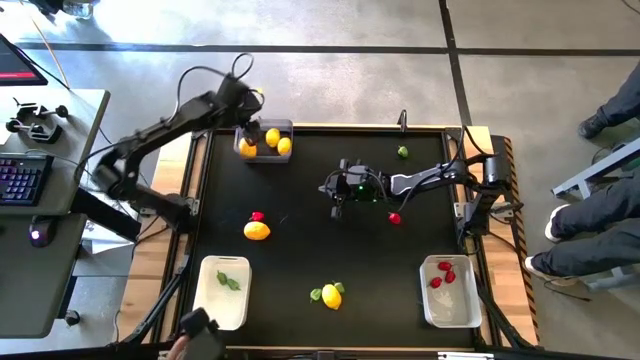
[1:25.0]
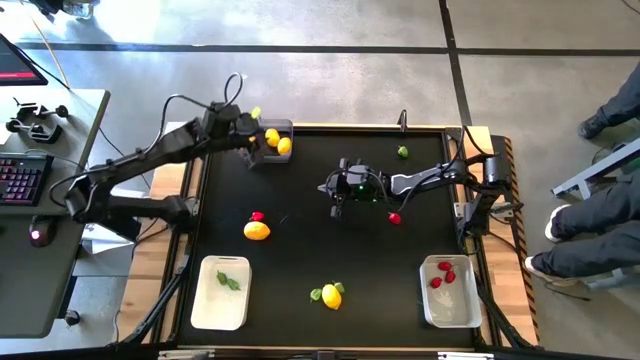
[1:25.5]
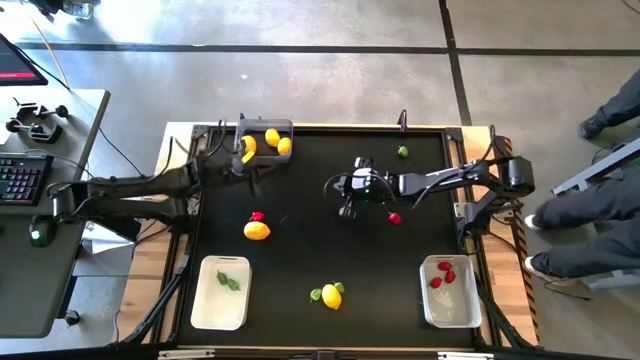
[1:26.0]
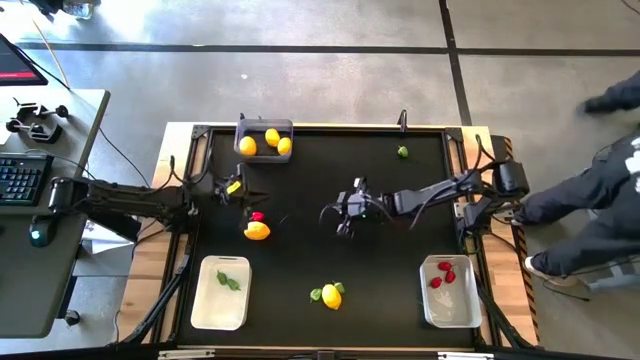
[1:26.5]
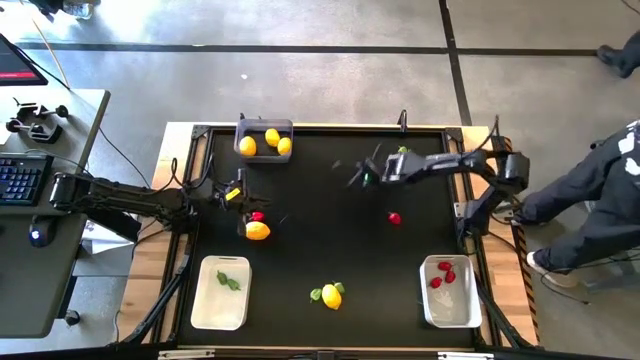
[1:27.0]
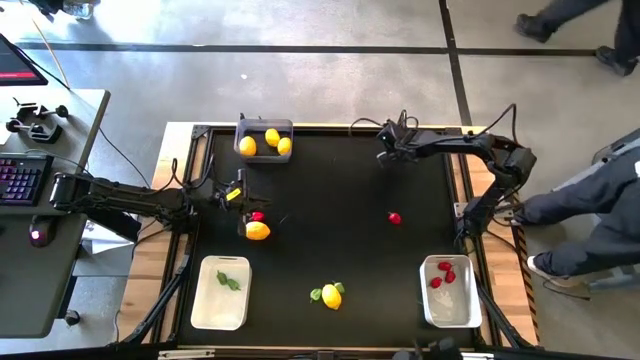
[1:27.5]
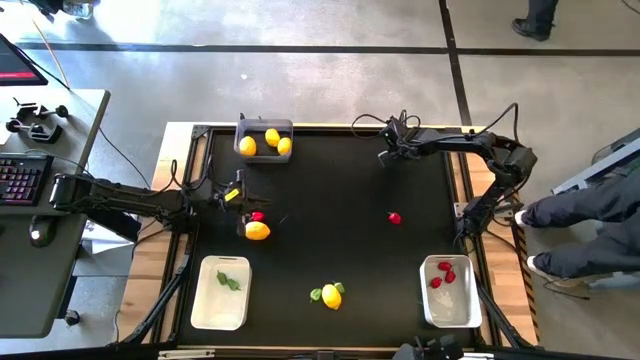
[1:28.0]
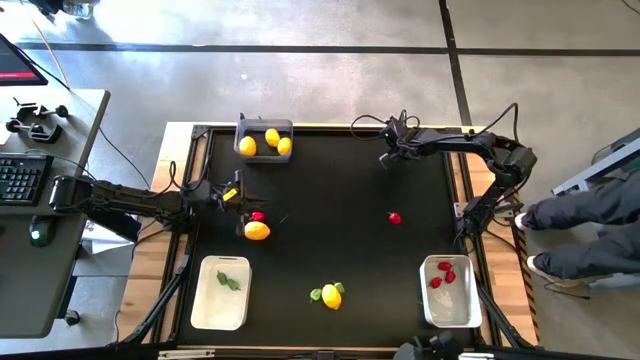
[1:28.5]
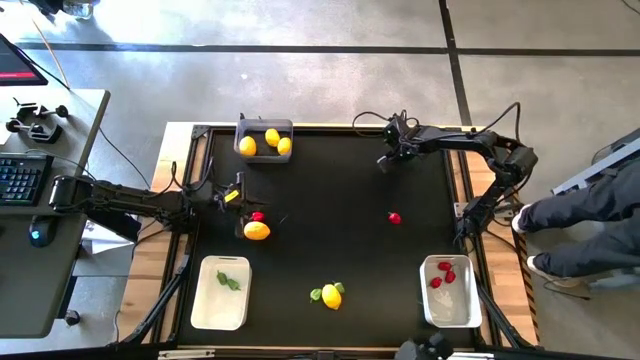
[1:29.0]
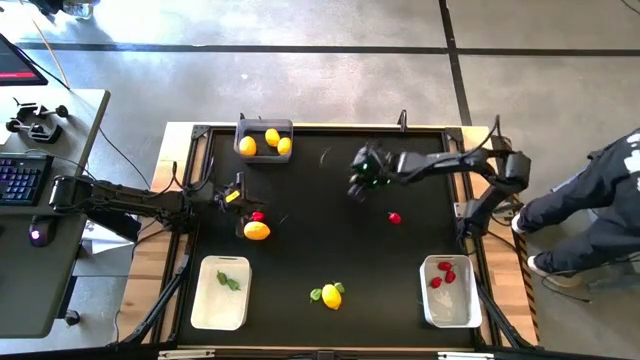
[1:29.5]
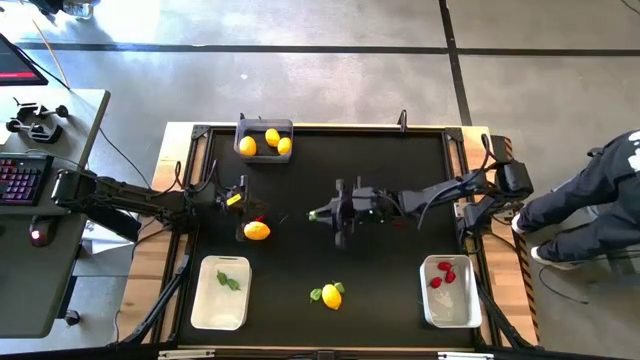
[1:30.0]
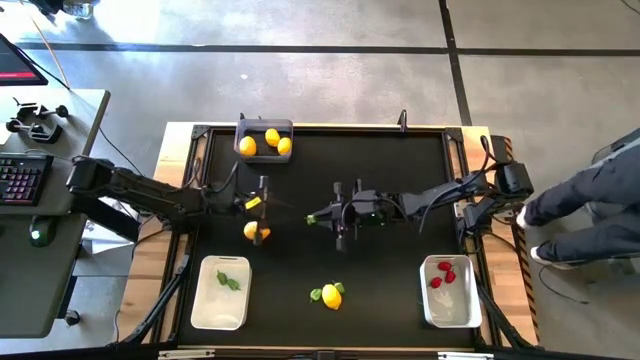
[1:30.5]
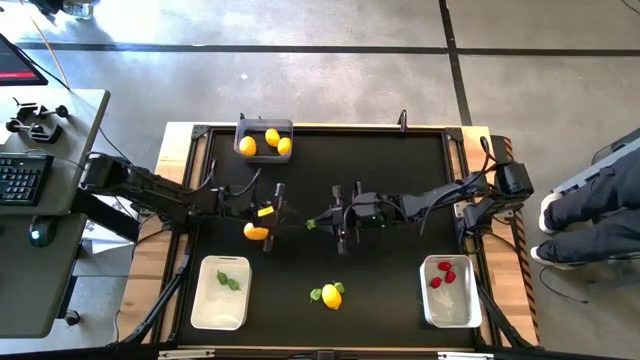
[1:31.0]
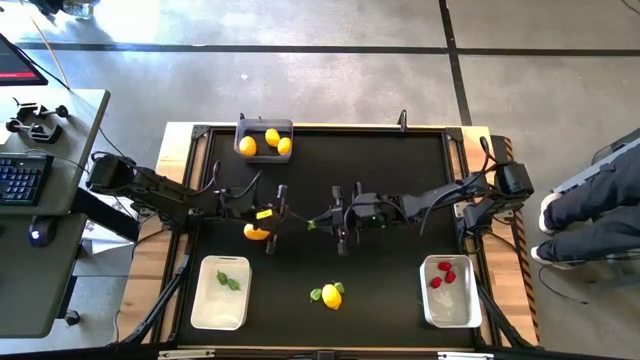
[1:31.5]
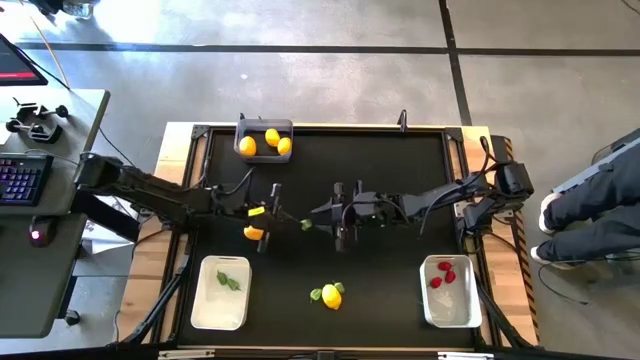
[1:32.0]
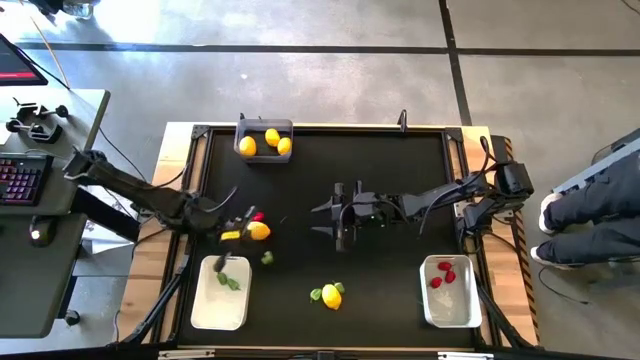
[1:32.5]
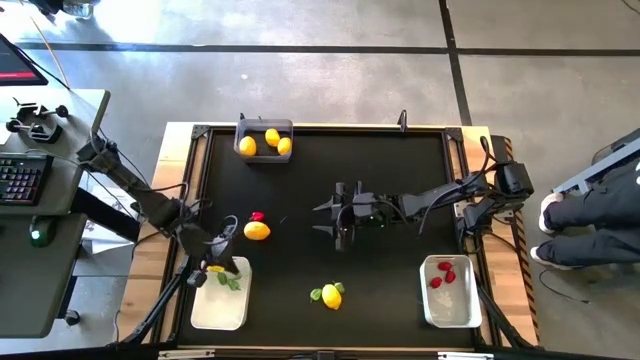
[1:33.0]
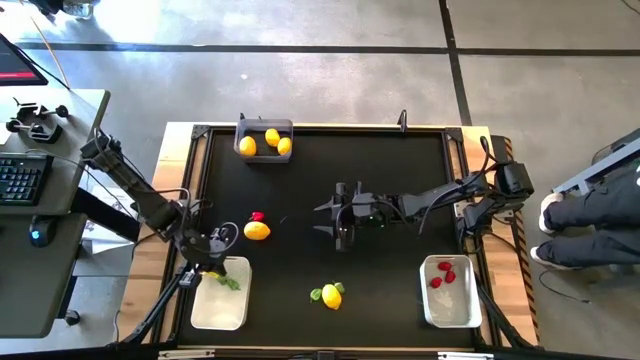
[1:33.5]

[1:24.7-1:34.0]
Task: Sort produce into baskets
Put the green chili pepper into the white bin

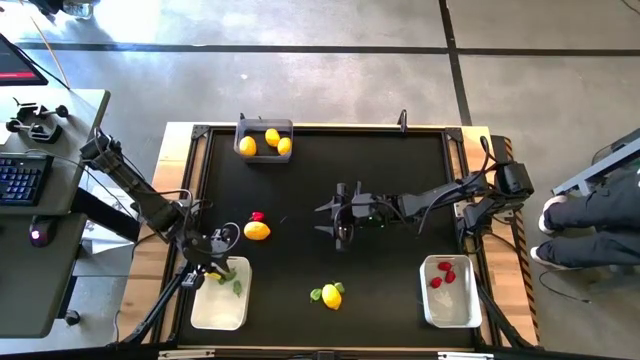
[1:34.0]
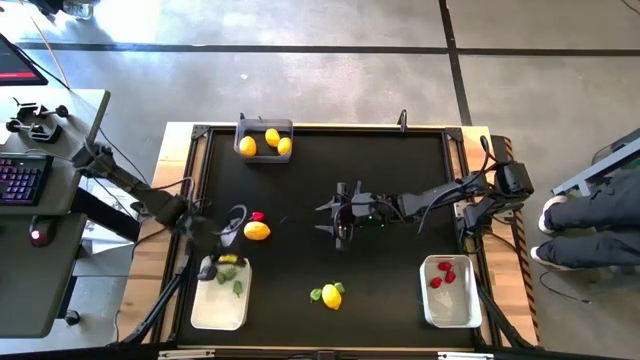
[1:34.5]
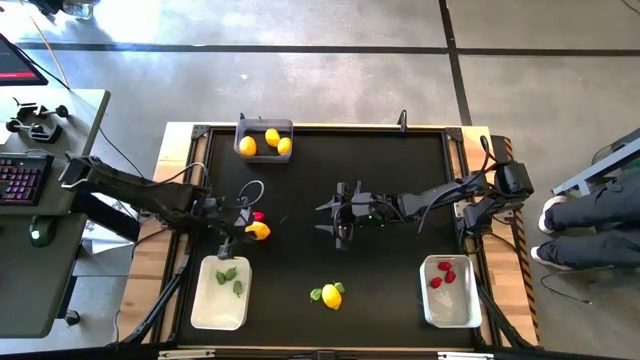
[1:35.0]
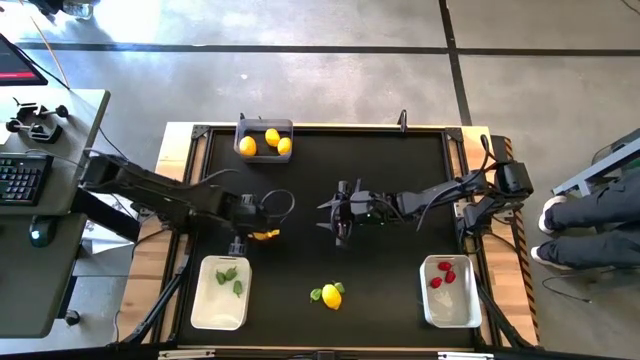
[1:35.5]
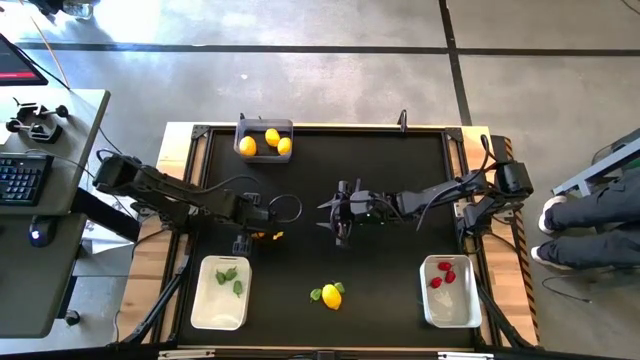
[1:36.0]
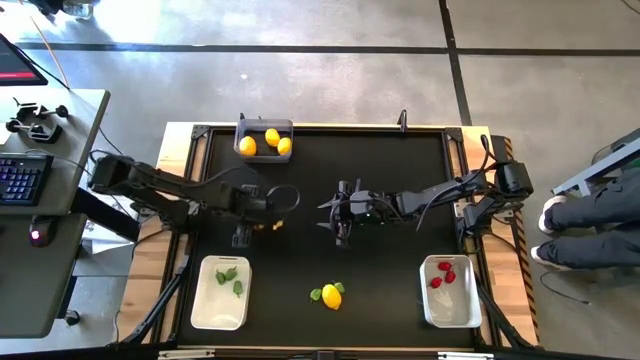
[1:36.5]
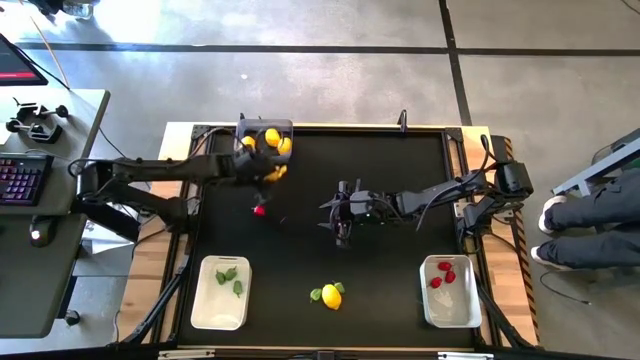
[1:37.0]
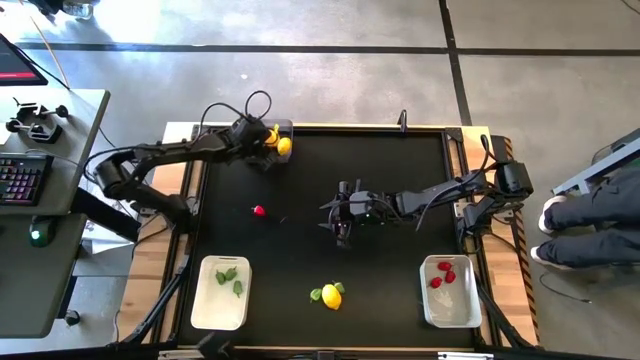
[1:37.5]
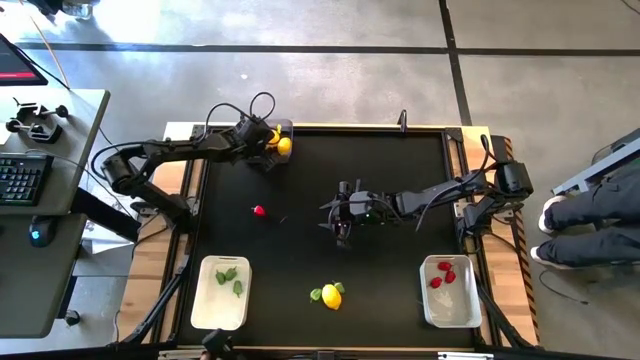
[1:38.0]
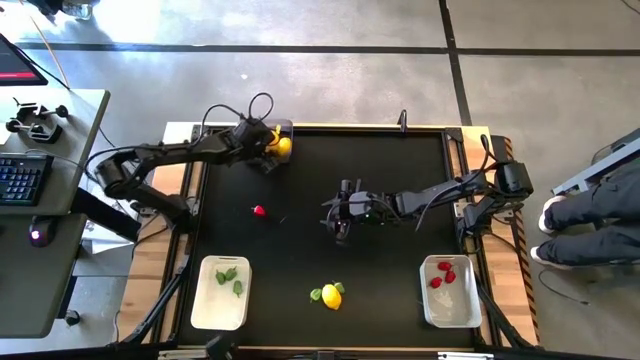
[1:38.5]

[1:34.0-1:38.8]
Put the yellow lemon into the black bin

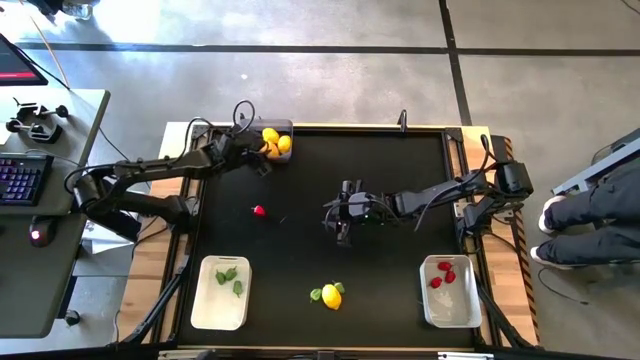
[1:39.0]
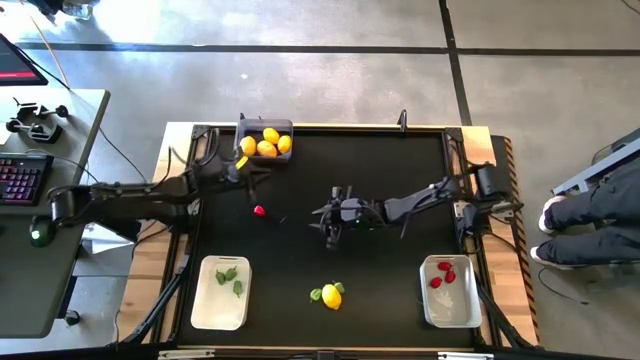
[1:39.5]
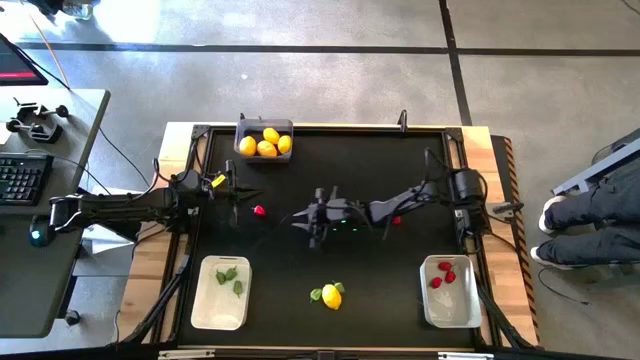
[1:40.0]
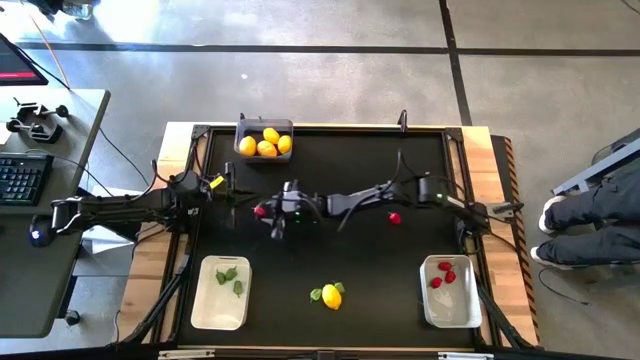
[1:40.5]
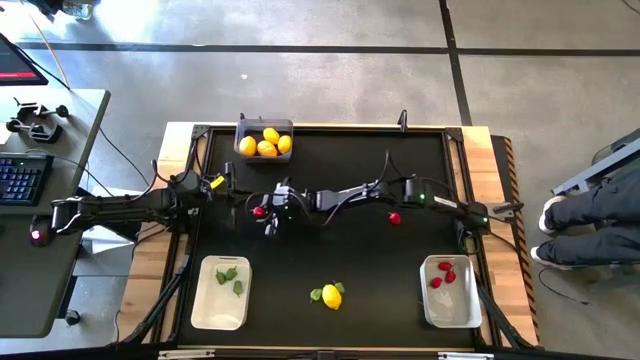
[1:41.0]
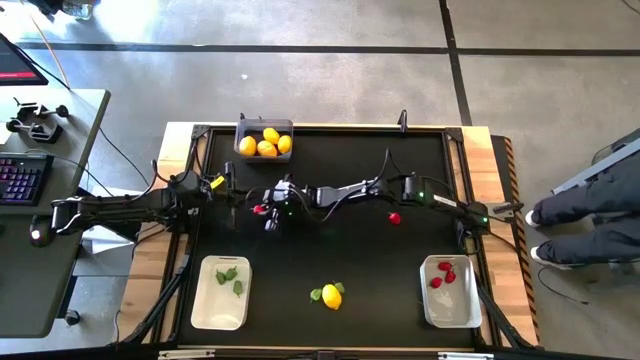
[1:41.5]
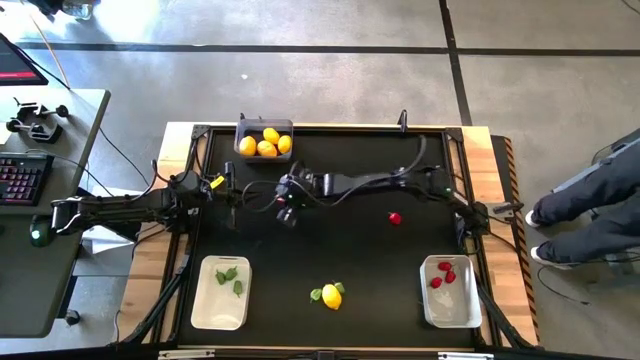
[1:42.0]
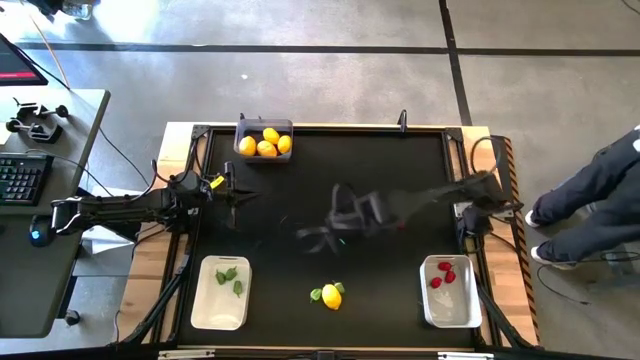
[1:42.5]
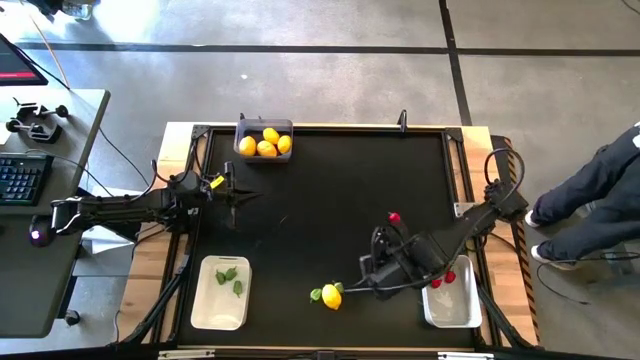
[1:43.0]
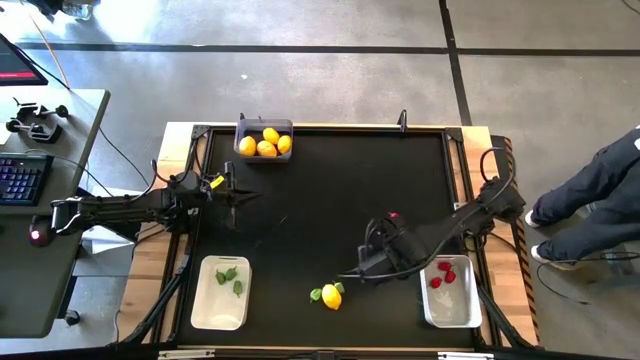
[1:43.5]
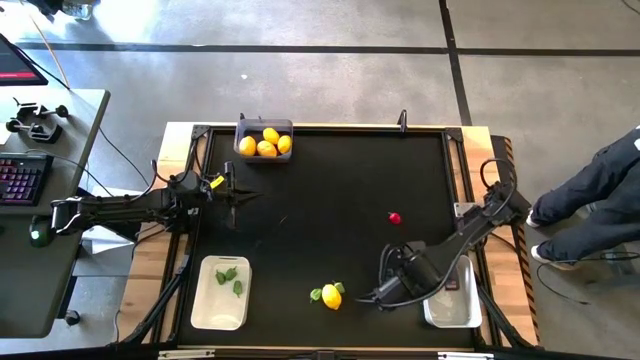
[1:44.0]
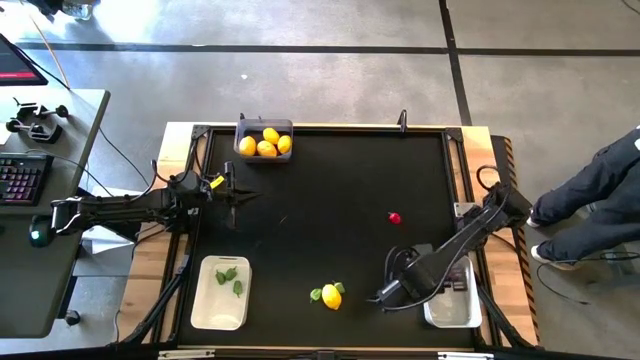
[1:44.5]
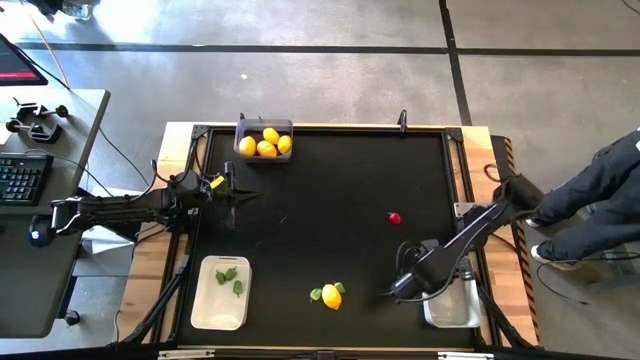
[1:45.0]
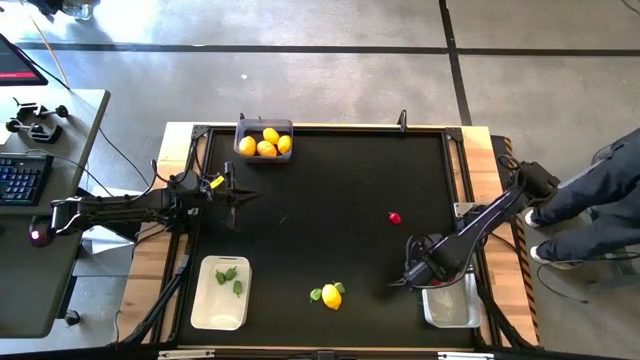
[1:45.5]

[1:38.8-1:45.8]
Put the red chili pepper into the gray bin
